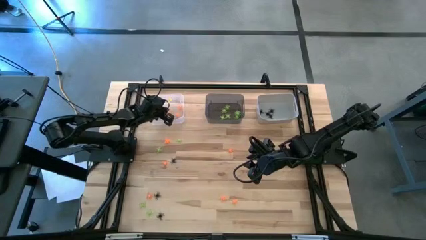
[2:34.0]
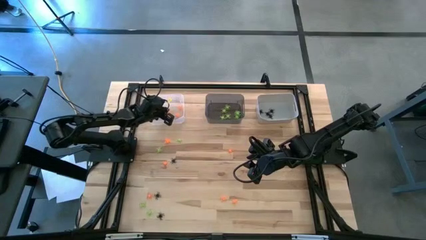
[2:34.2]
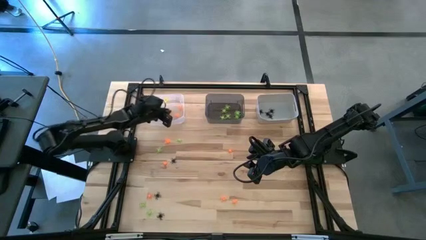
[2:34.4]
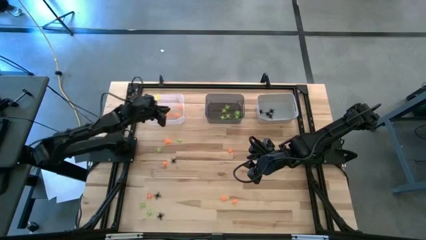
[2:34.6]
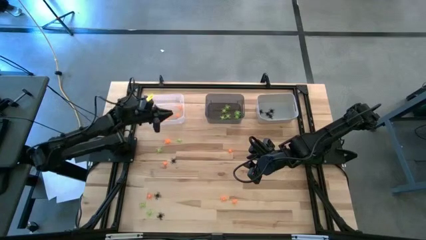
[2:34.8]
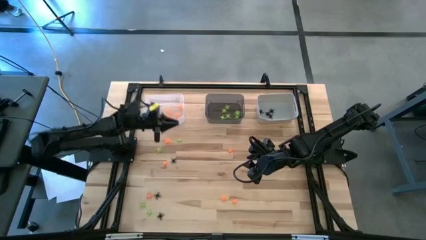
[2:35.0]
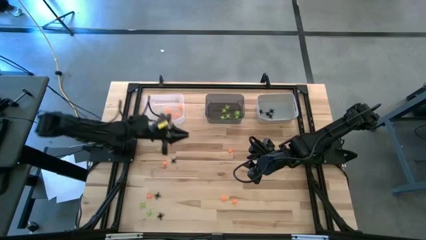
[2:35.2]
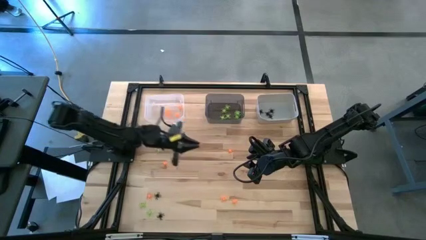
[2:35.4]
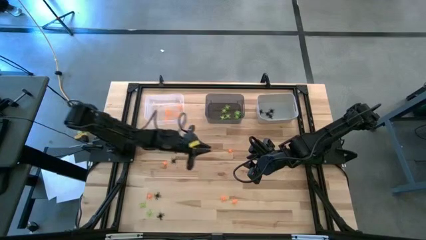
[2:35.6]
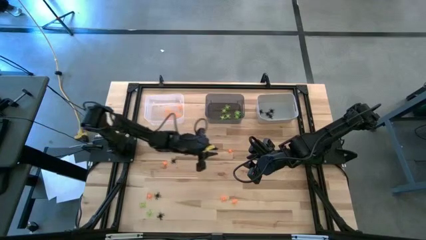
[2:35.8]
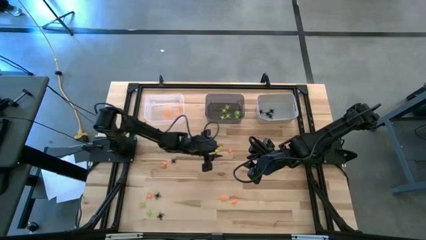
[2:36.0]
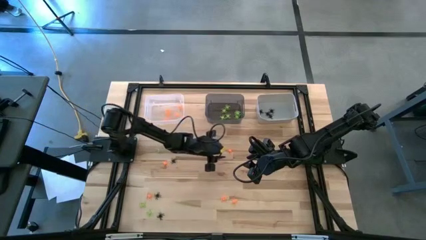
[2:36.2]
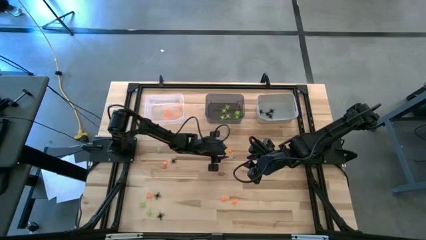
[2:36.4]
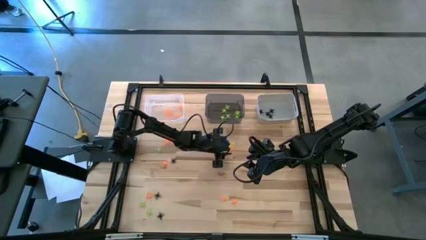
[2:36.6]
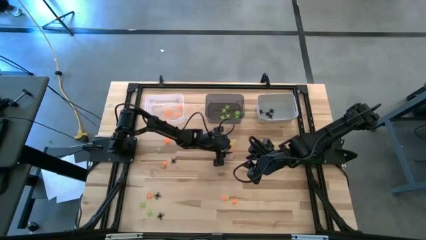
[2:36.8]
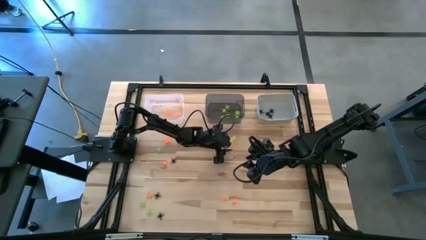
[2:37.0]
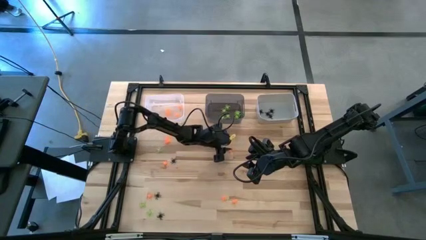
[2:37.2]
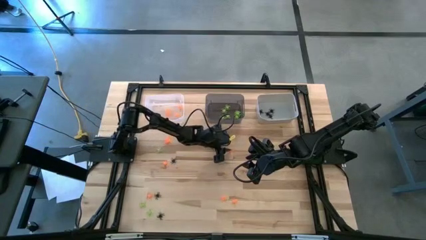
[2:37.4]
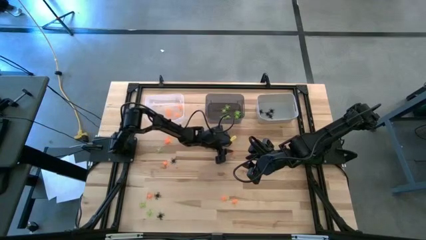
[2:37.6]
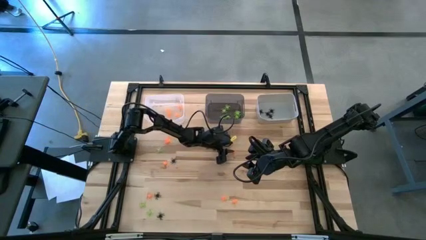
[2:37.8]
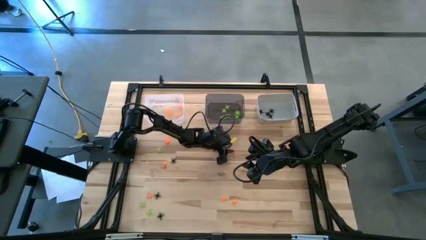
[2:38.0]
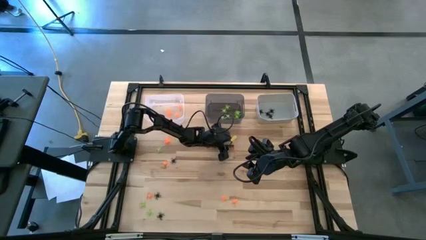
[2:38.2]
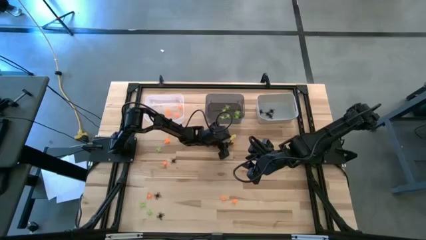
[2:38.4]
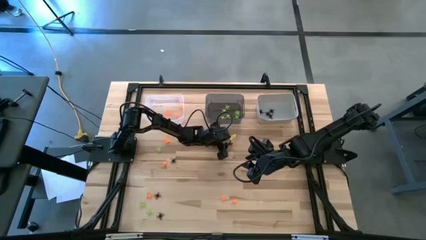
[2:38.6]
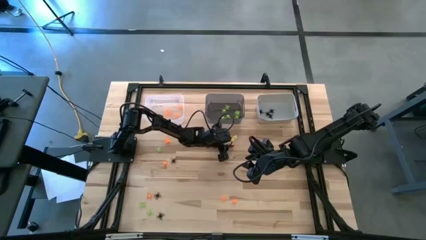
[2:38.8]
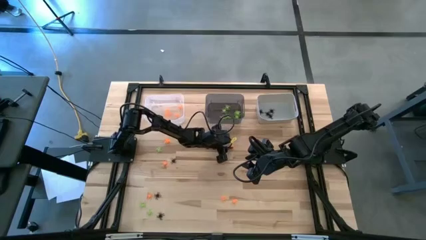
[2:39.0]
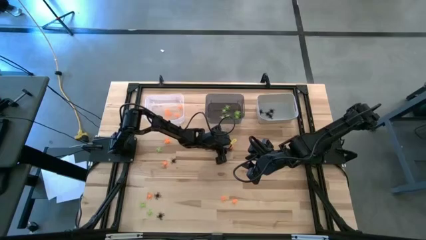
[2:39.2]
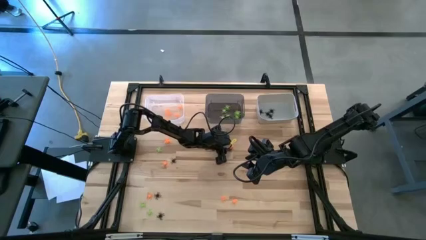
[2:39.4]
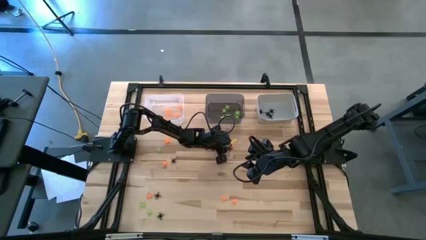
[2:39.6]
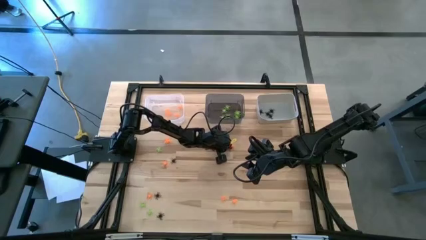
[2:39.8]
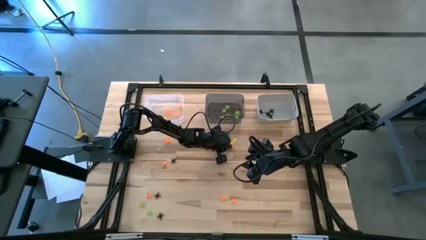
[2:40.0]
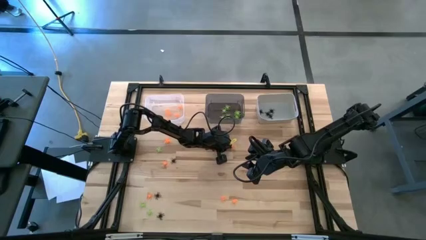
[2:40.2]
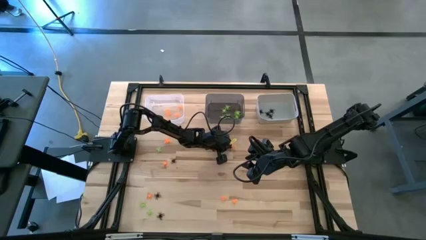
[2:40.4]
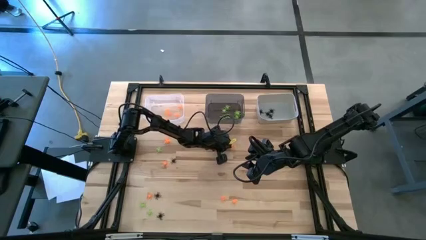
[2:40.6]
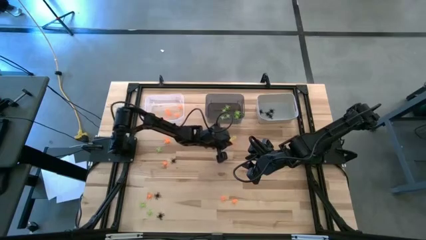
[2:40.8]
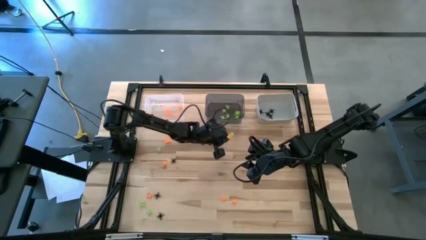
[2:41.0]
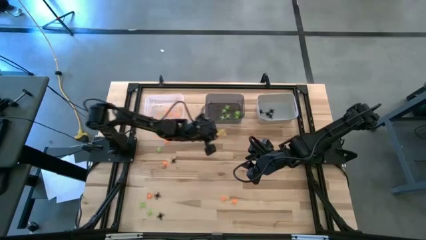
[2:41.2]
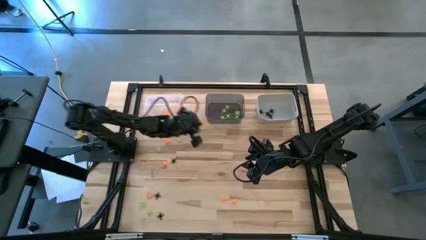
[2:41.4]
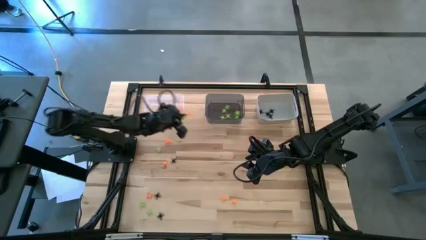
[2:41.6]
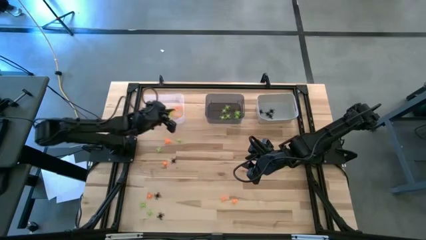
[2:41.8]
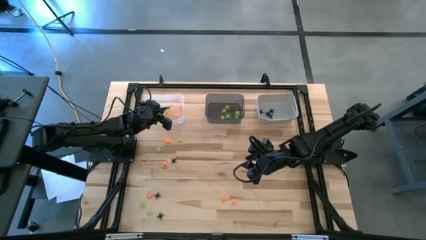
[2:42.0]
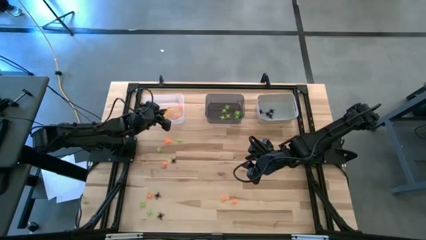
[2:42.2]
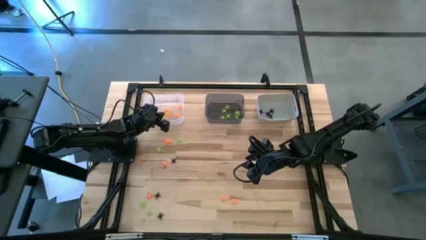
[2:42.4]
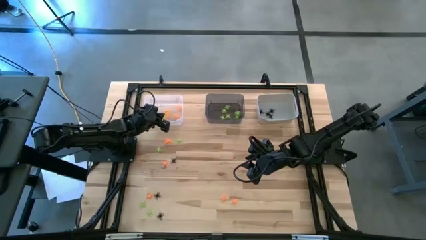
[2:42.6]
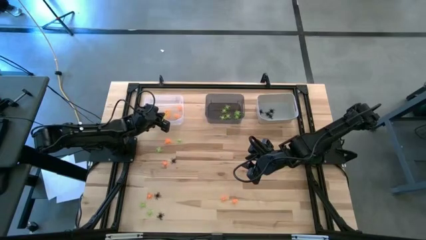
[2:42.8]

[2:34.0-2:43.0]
Task: Sort Halloween decoration
Put the orange spider toy into the transparent bin

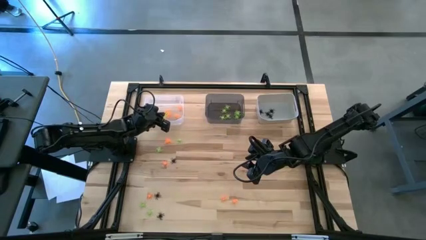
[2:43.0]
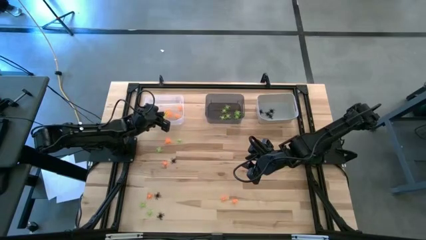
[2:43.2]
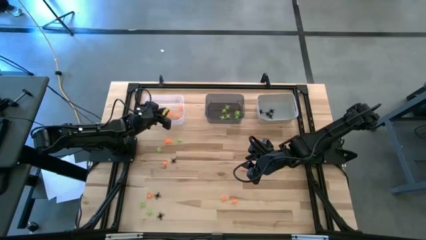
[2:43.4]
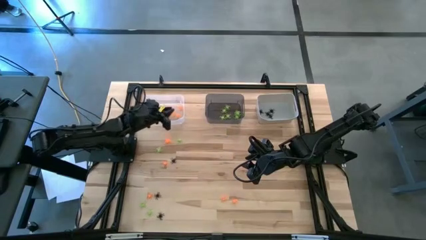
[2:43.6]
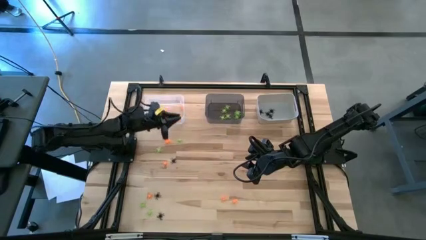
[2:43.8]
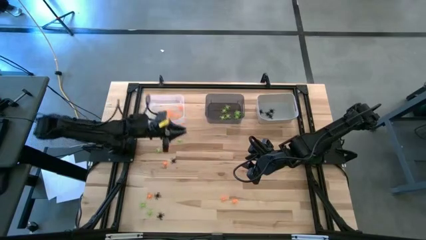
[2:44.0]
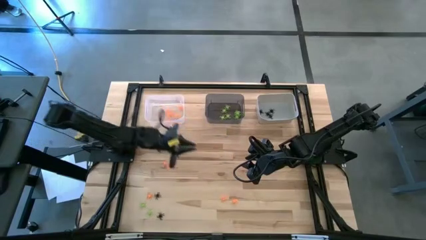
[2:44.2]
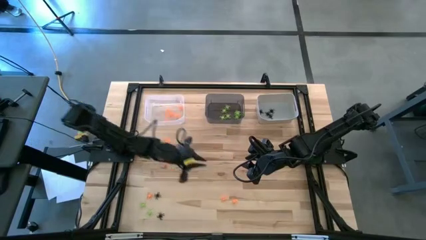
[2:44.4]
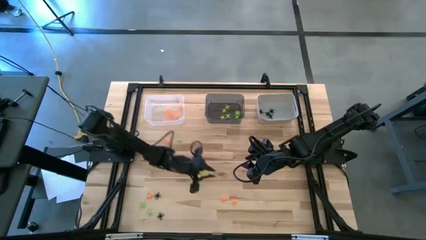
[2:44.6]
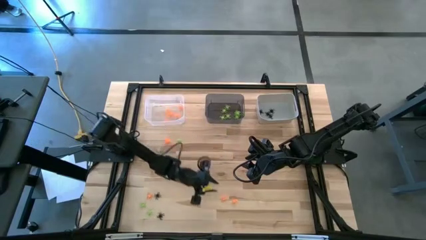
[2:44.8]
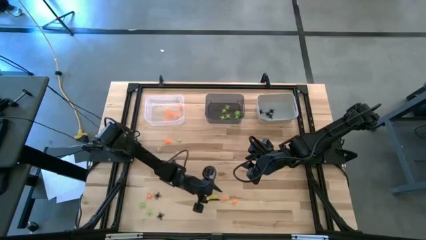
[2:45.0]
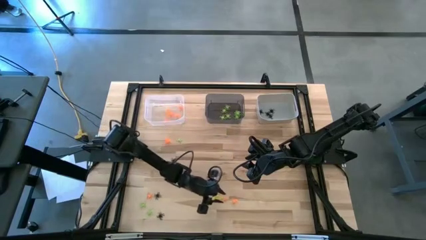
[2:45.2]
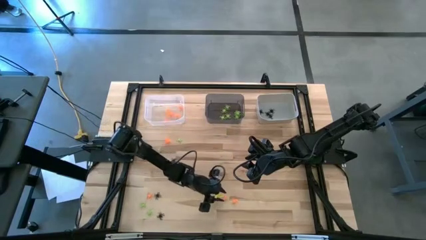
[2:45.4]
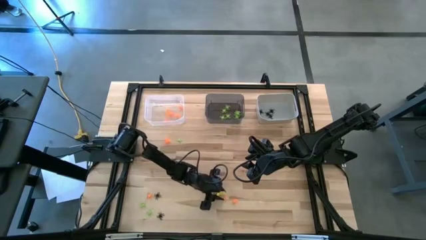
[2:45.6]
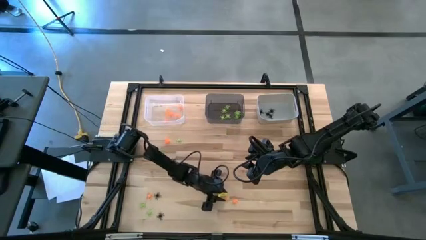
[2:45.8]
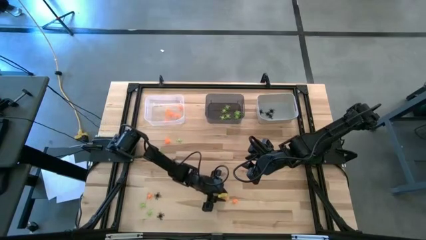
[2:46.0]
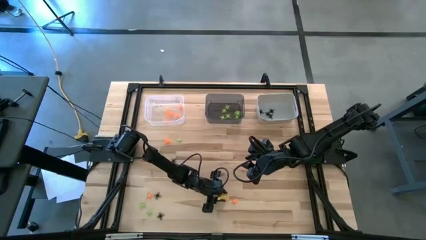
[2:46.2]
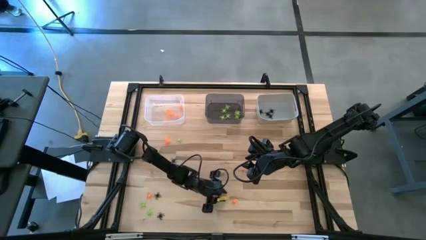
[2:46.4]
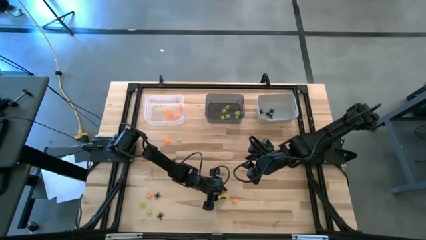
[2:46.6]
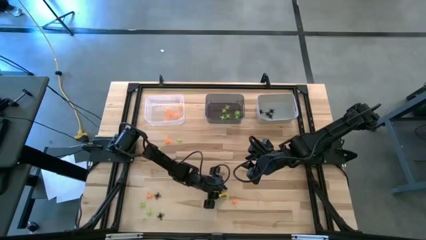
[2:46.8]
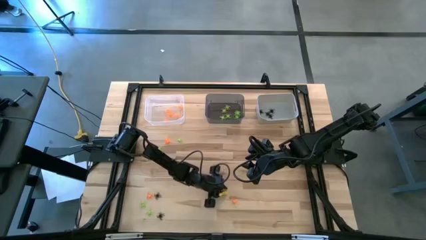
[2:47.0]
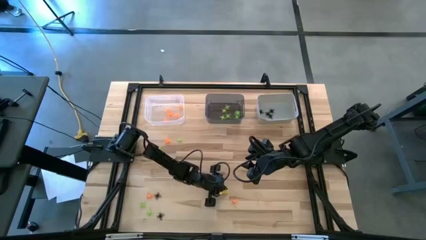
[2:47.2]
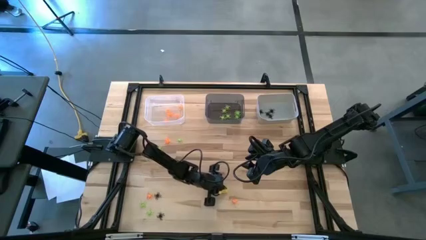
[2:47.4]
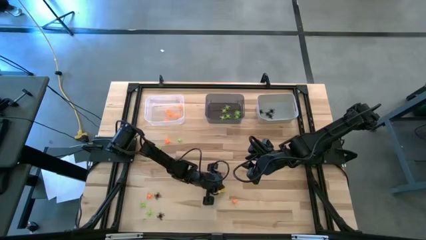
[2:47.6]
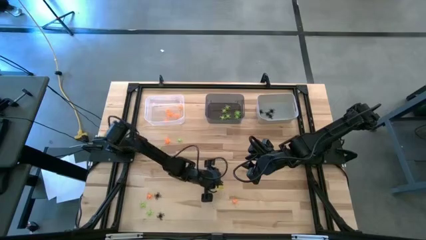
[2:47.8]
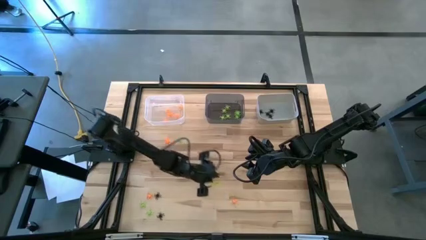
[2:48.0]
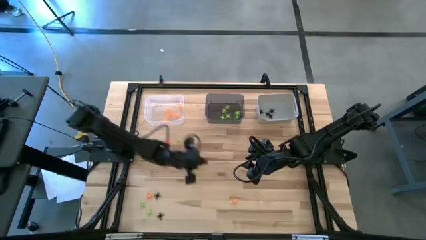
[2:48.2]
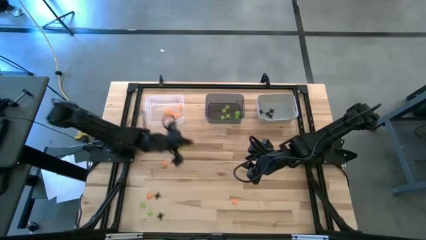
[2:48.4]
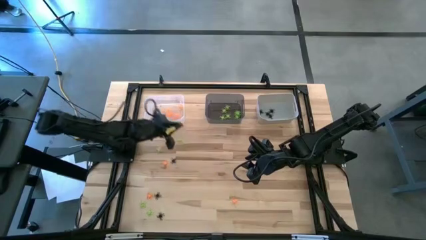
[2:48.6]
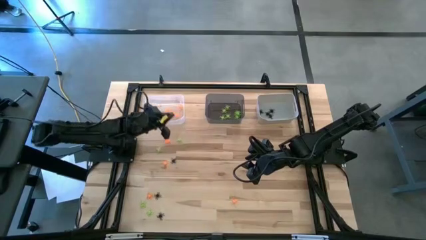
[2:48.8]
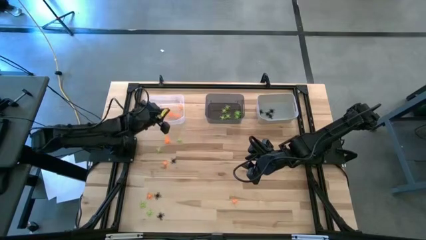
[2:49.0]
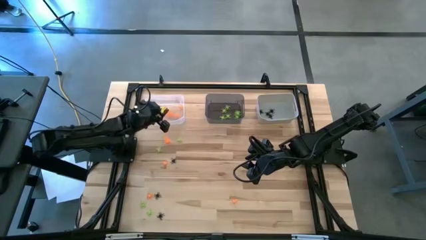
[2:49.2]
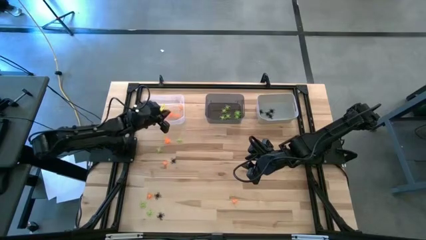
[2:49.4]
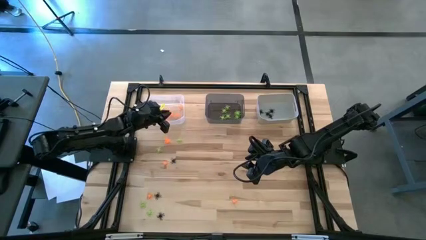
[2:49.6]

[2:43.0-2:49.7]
Put the orange spider toy into the transparent bin
